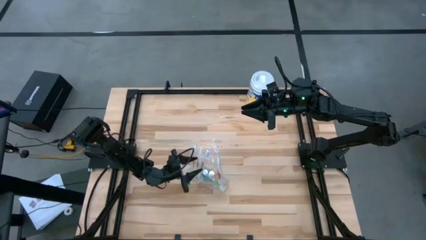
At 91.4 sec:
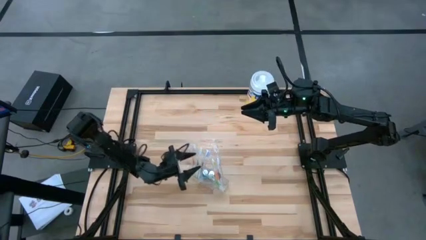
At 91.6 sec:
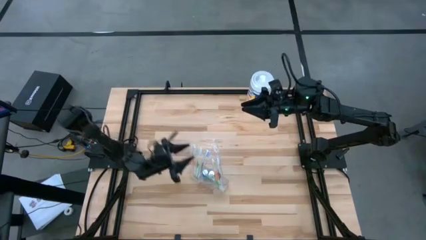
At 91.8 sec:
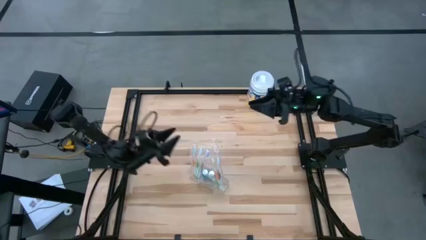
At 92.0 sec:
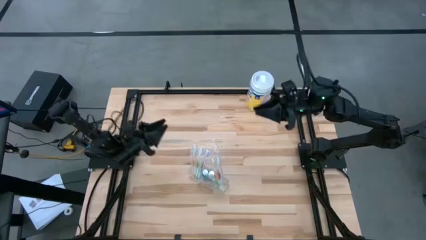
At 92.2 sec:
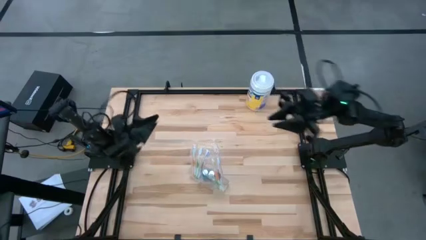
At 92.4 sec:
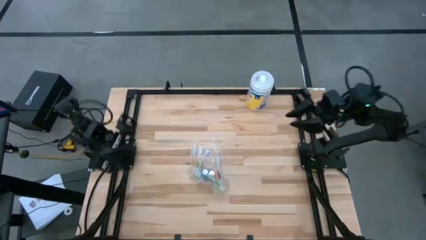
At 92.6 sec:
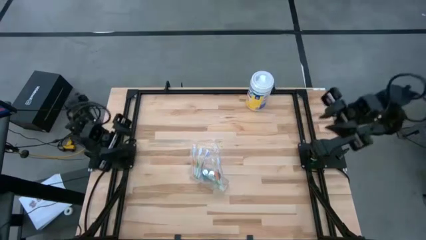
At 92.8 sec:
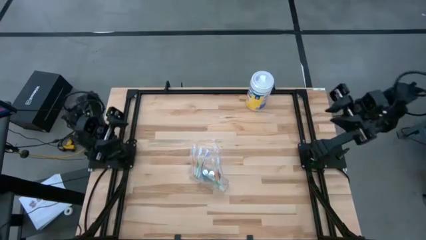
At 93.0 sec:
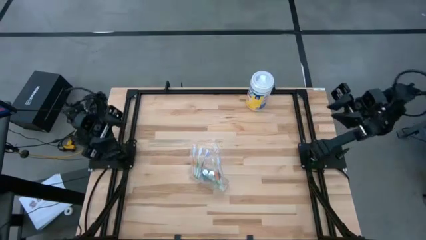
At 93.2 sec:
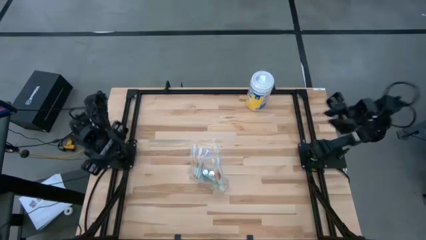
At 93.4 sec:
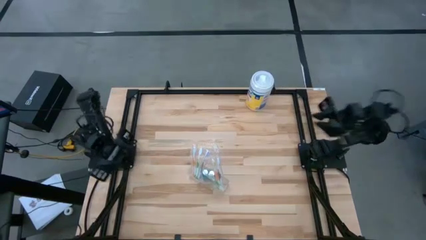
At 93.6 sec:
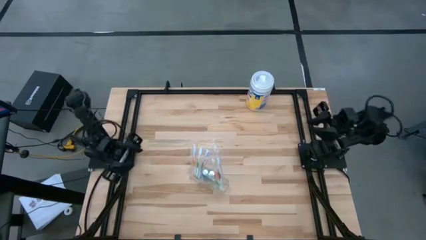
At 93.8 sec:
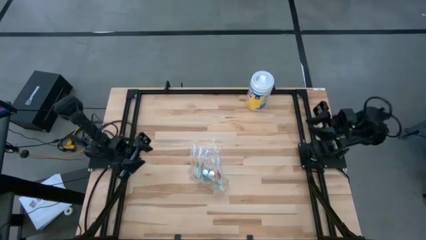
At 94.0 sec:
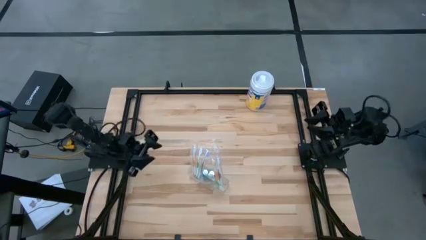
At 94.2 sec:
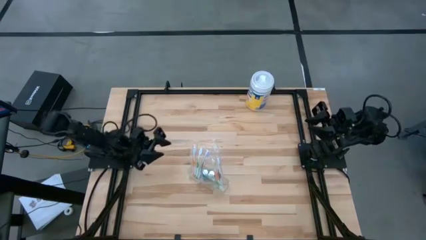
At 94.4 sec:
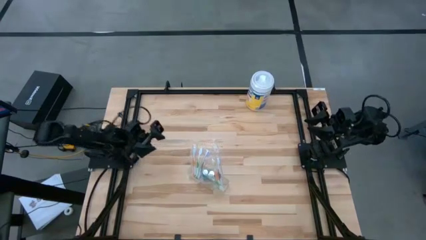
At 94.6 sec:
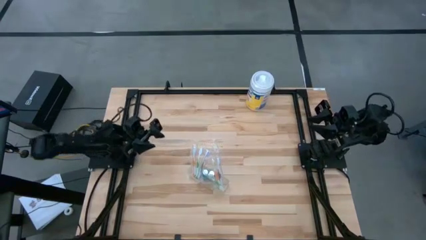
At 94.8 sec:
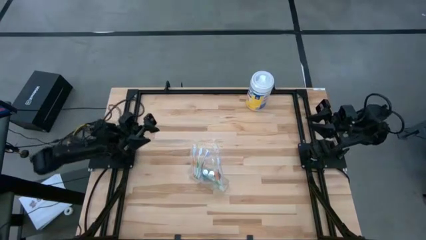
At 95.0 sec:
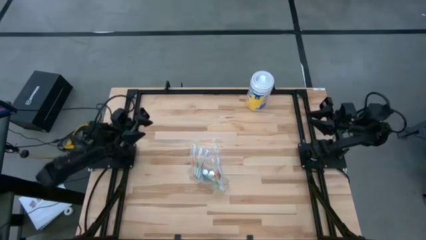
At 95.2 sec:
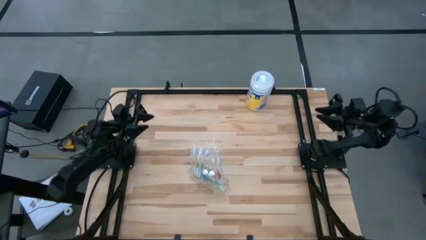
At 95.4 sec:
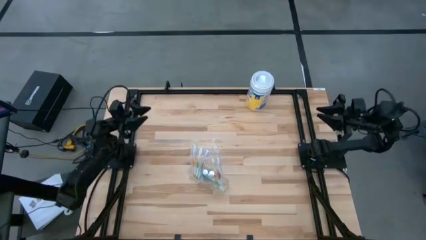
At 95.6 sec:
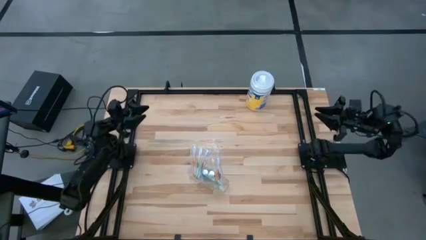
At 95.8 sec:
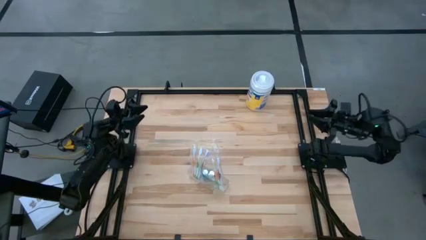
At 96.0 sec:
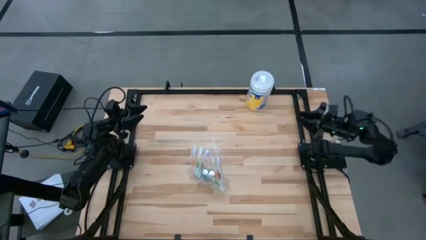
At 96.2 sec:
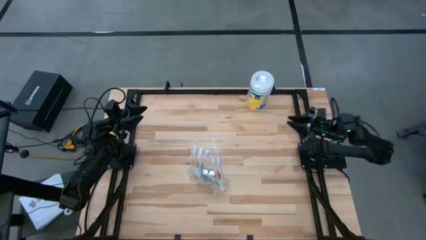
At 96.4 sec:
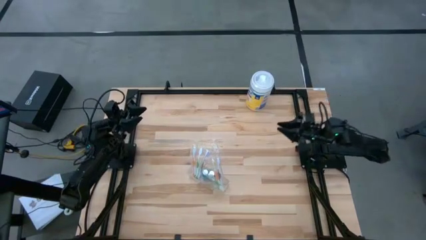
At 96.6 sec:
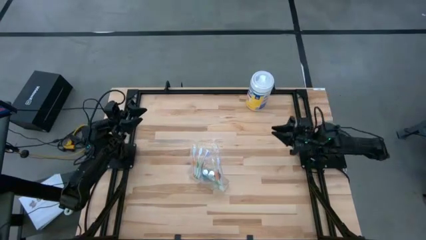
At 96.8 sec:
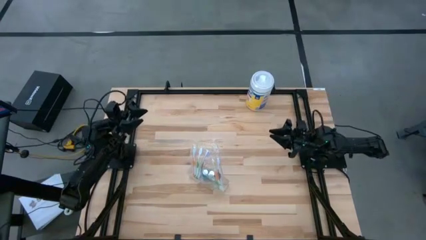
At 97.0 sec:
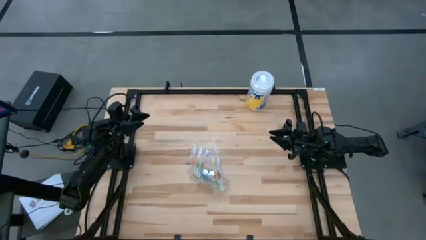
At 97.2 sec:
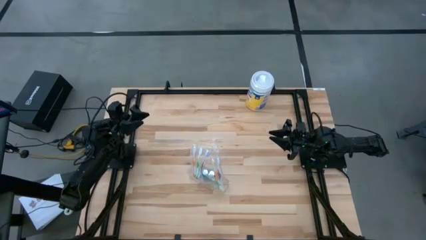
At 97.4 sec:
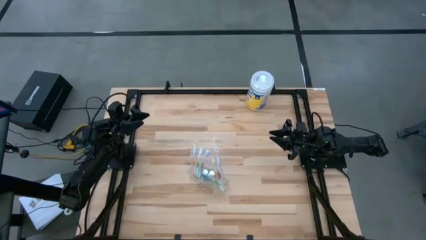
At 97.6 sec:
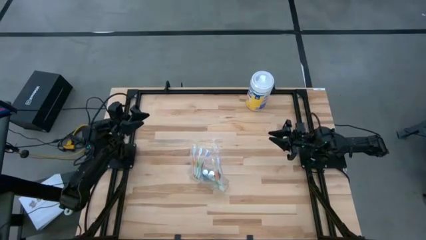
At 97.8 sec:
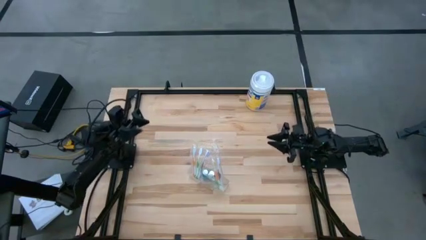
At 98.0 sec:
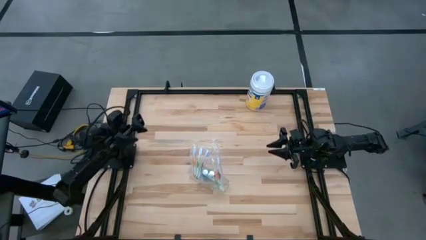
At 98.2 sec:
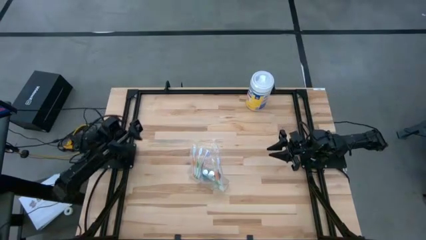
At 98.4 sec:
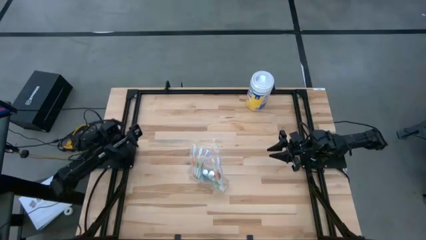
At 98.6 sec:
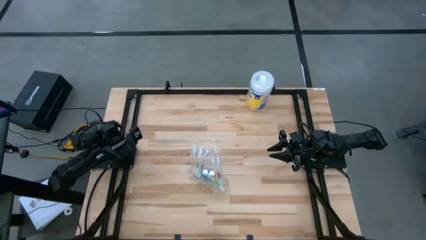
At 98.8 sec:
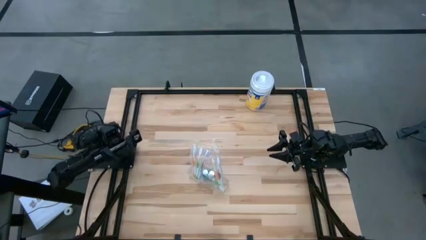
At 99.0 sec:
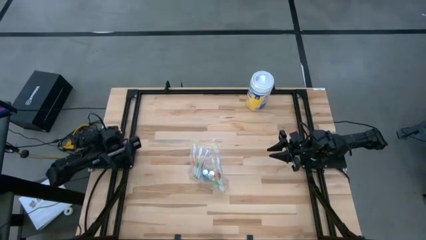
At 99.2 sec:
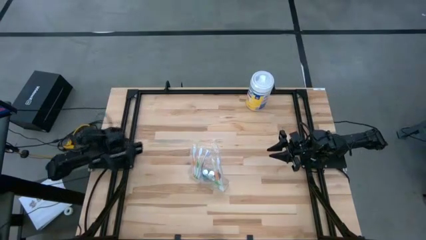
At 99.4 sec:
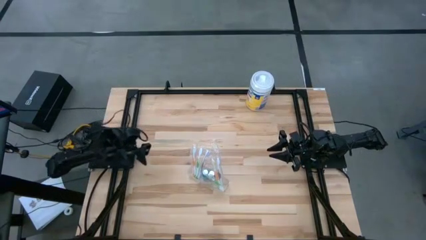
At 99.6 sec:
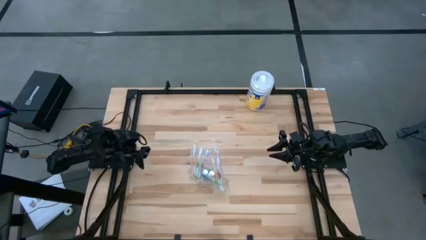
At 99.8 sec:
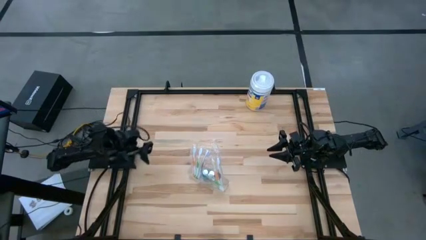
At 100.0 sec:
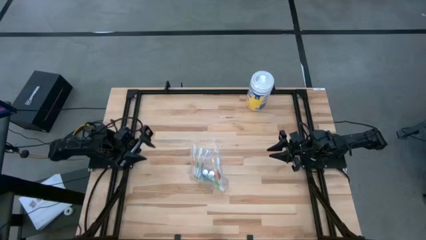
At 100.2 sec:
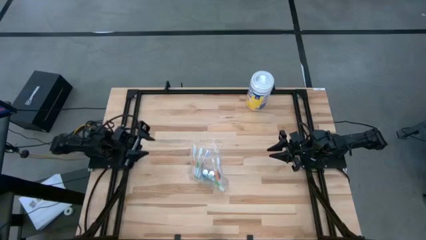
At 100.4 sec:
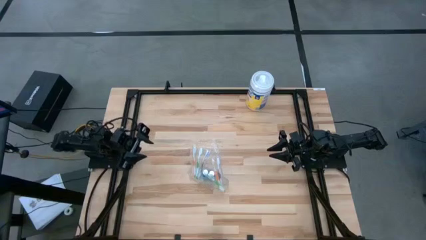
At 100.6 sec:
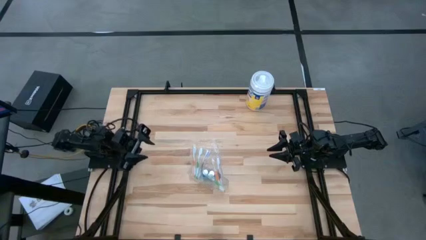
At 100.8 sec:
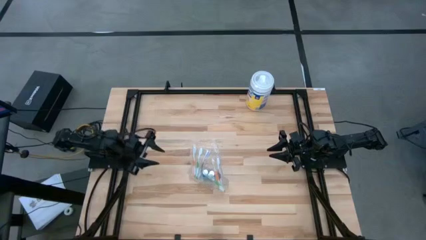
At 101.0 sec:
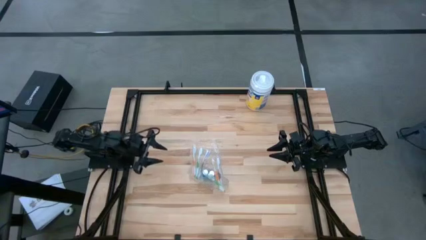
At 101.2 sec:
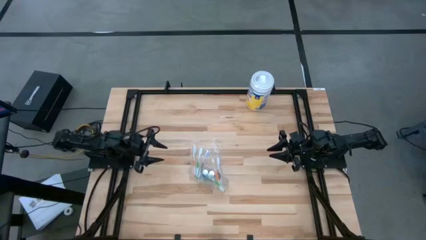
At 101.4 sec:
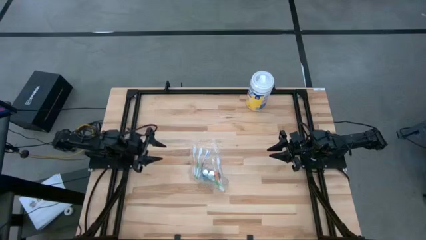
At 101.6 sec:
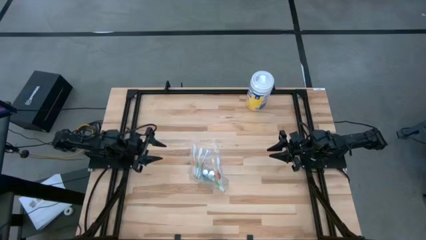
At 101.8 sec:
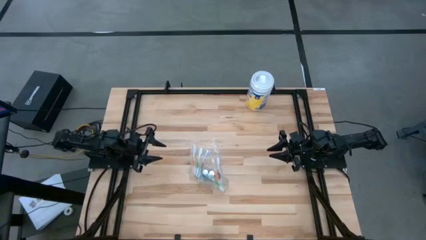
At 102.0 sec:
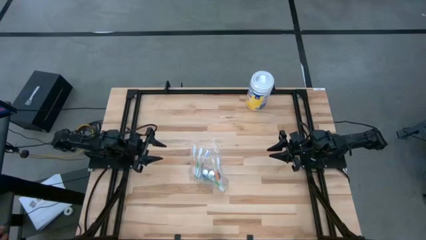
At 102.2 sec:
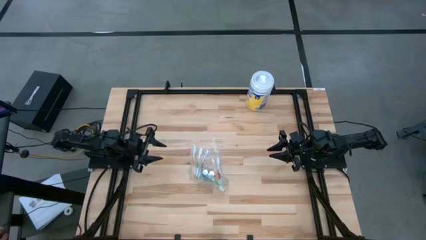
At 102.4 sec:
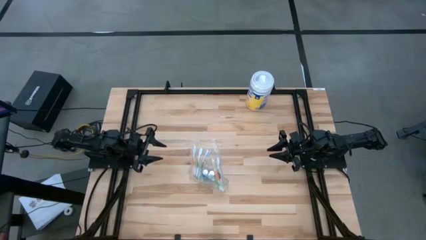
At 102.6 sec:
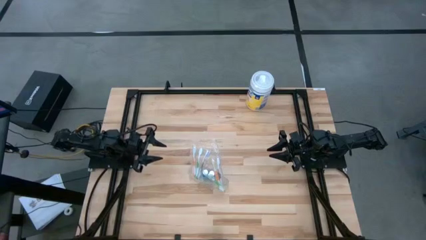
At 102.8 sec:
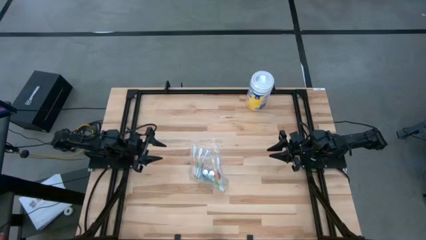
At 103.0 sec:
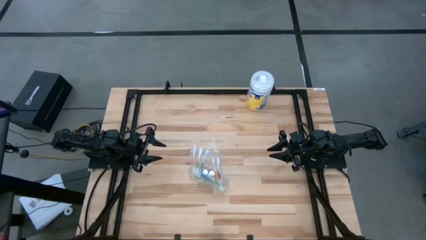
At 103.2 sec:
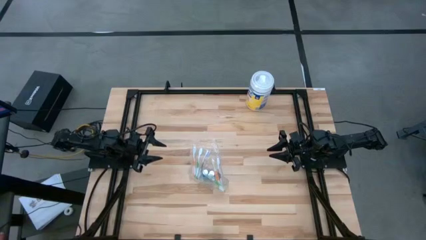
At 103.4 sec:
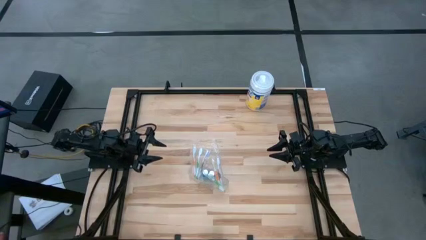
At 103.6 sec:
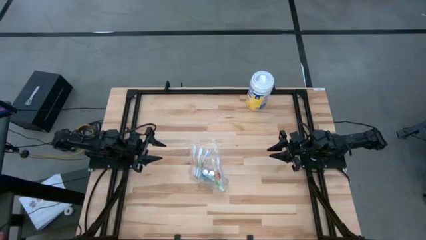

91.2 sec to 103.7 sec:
Task: Pick & Place toothbrushing station
Return To Home Position

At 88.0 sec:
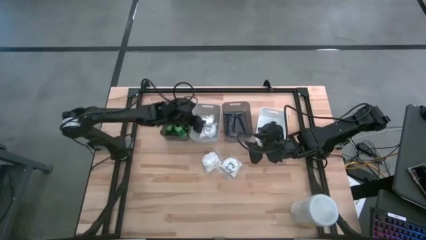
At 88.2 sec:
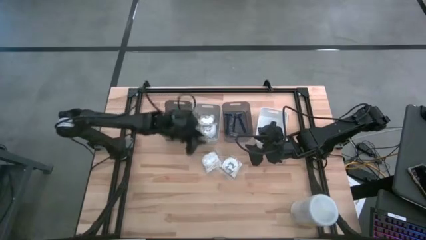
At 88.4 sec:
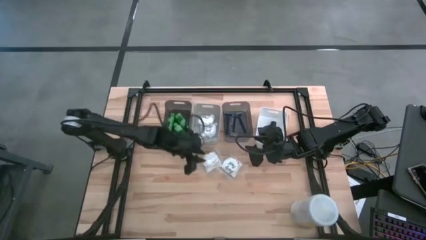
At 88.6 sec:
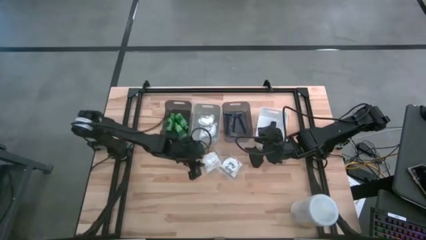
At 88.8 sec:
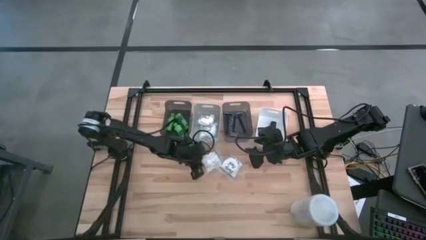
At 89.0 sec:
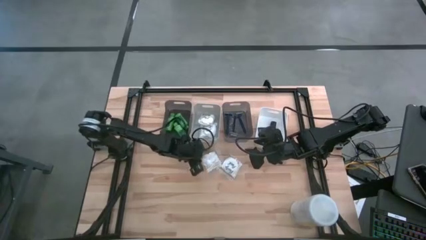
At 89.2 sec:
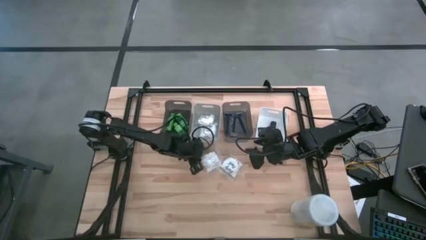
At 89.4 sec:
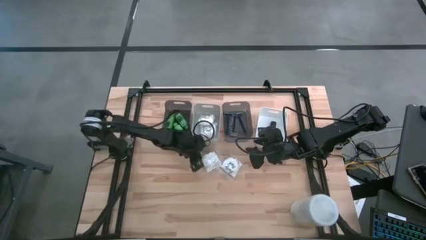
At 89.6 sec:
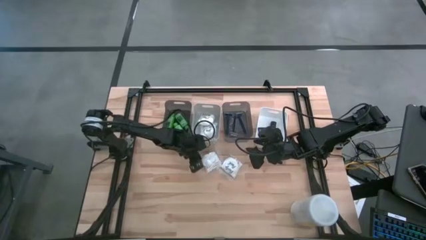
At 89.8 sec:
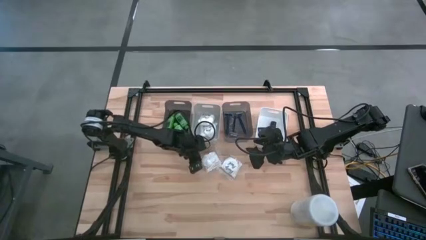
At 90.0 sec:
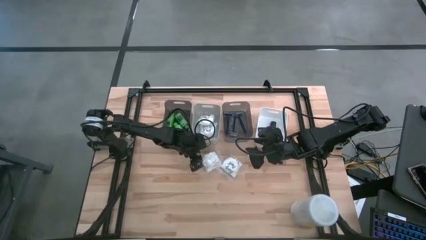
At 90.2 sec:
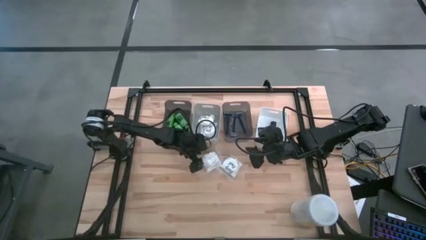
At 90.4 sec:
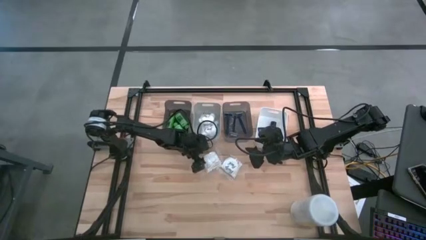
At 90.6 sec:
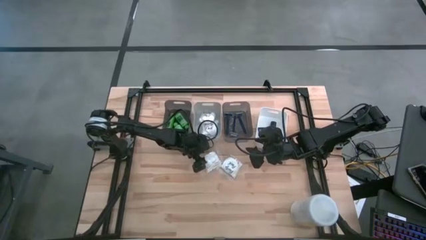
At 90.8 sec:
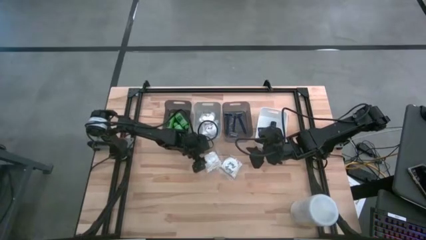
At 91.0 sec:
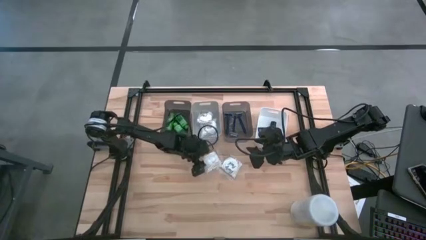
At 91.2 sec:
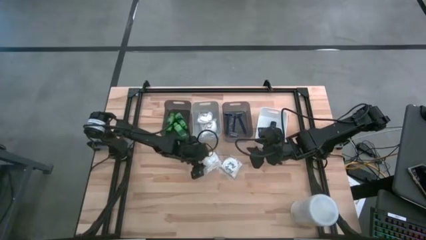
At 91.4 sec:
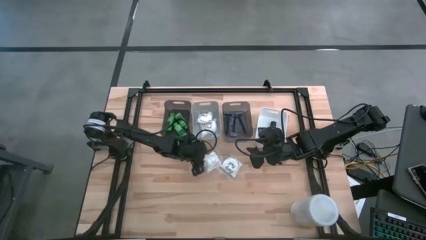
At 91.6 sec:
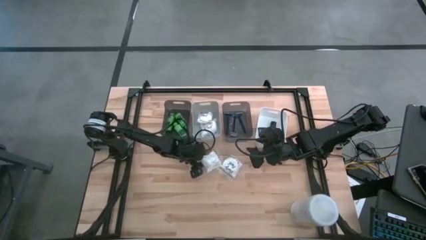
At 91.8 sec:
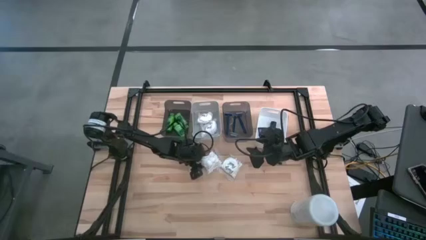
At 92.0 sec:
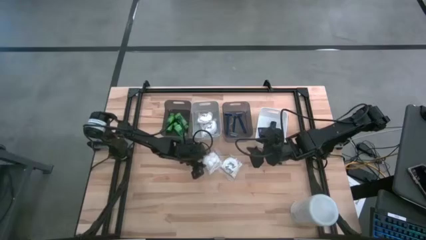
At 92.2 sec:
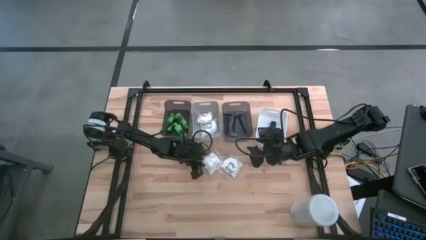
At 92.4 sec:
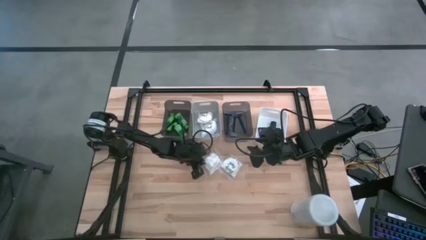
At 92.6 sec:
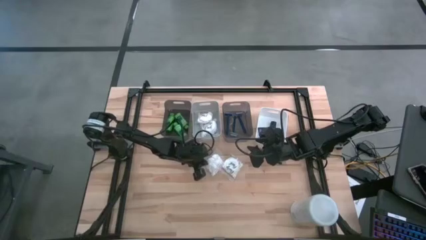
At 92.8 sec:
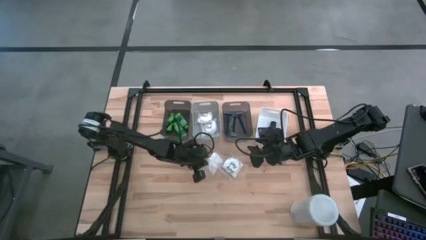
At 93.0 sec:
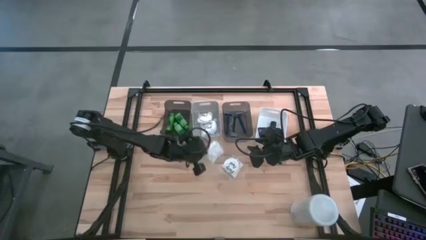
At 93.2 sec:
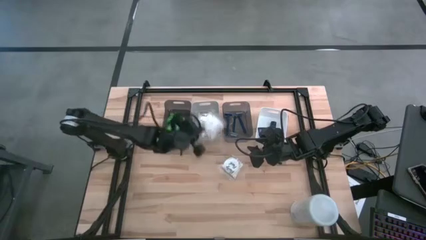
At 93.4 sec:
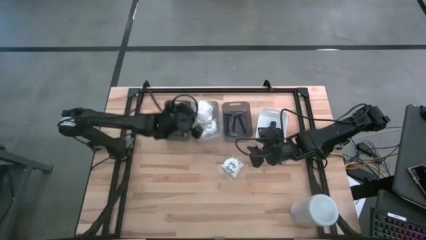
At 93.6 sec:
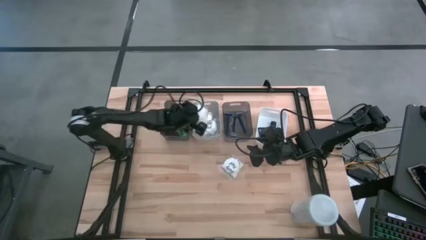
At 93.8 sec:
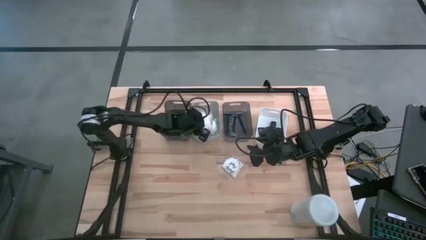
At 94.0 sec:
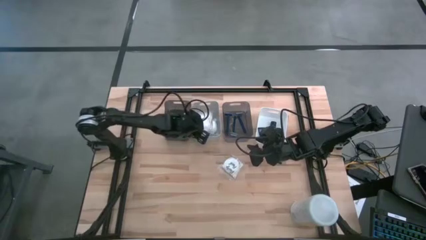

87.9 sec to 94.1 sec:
Task: Pick & Place Travel size toiletries
Put the white cotton pack into the gray bin
